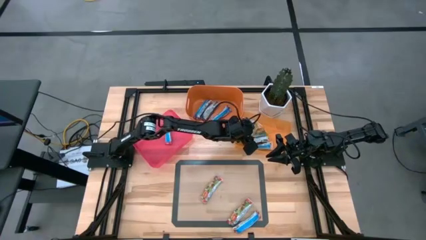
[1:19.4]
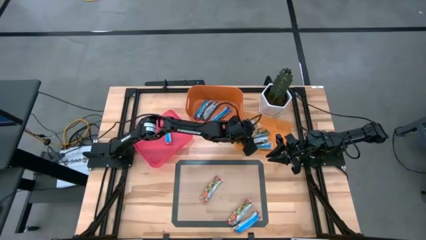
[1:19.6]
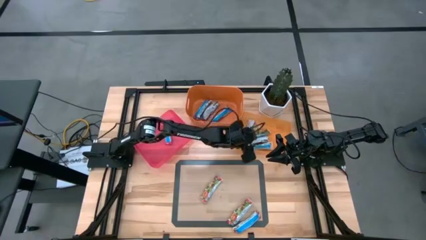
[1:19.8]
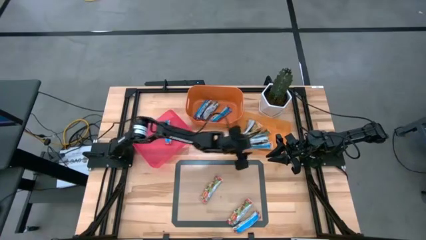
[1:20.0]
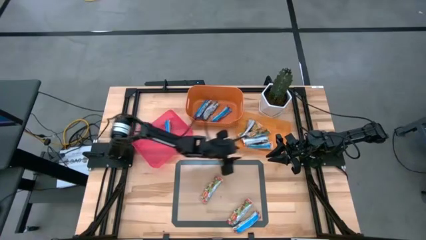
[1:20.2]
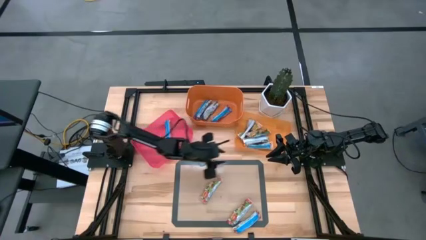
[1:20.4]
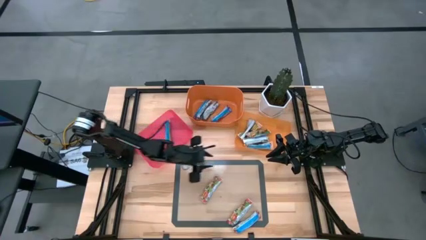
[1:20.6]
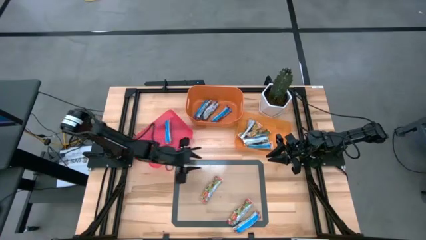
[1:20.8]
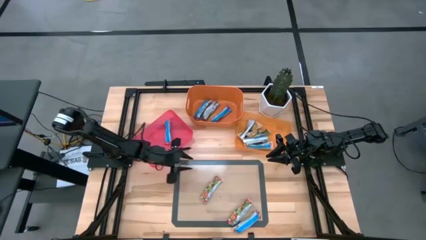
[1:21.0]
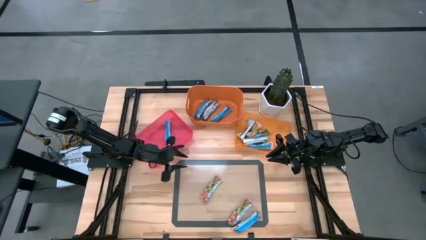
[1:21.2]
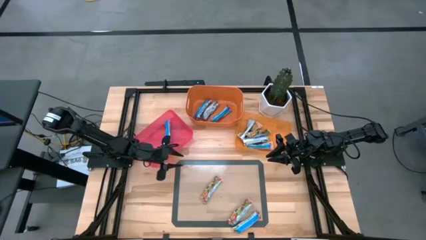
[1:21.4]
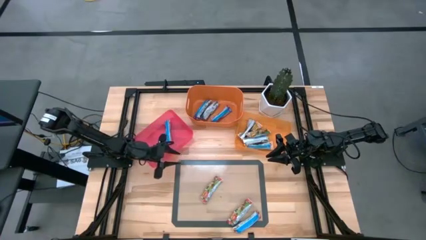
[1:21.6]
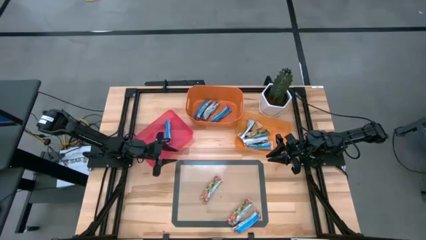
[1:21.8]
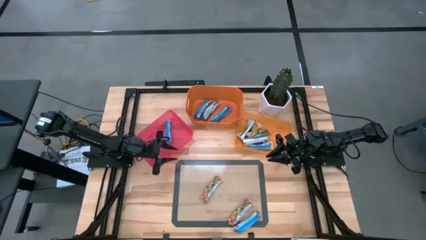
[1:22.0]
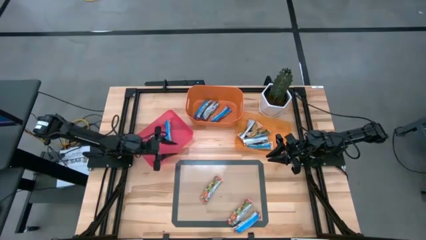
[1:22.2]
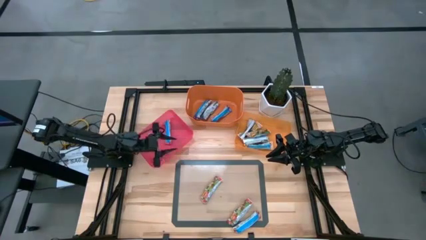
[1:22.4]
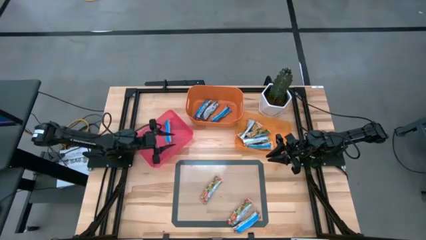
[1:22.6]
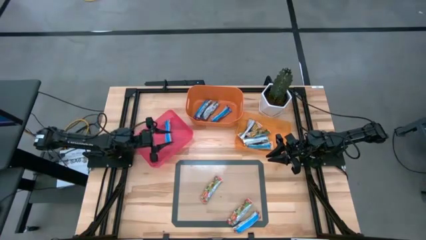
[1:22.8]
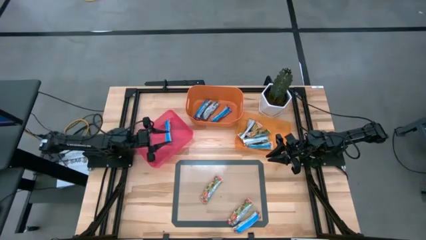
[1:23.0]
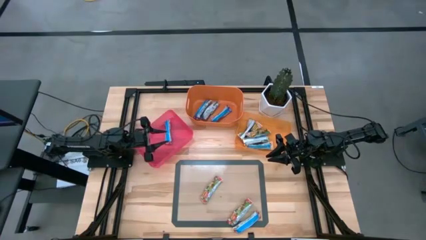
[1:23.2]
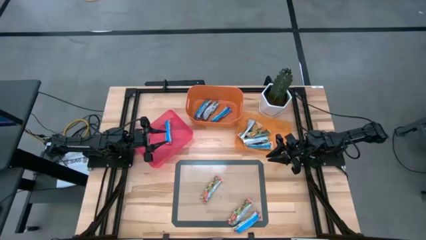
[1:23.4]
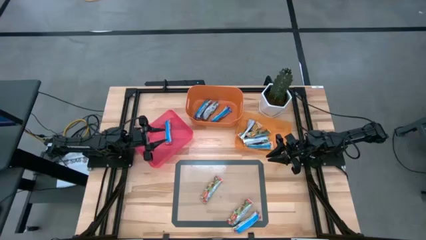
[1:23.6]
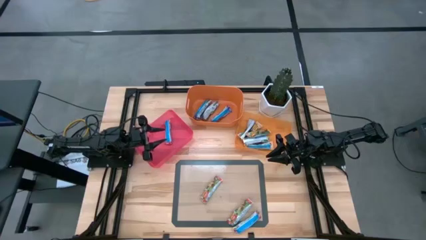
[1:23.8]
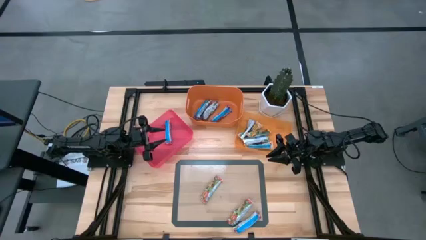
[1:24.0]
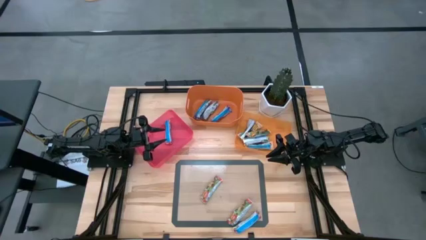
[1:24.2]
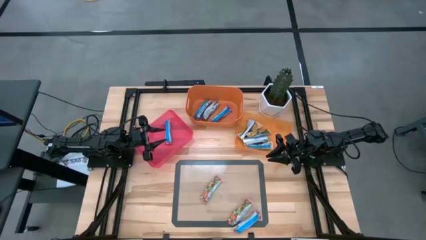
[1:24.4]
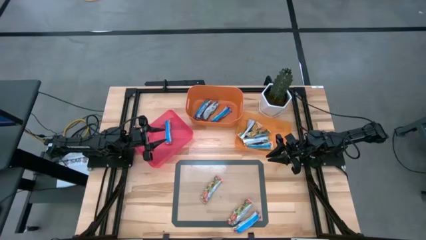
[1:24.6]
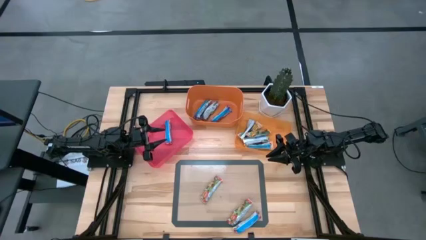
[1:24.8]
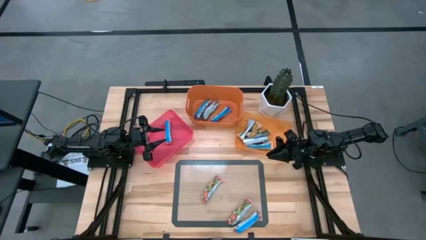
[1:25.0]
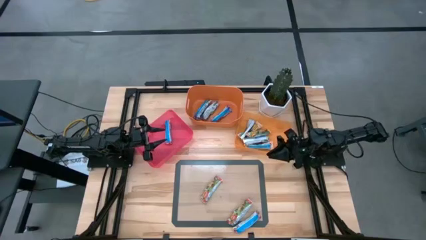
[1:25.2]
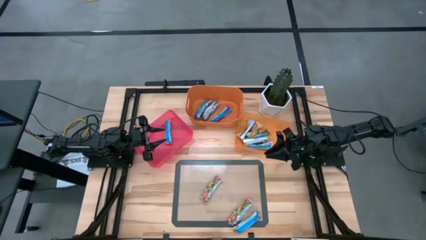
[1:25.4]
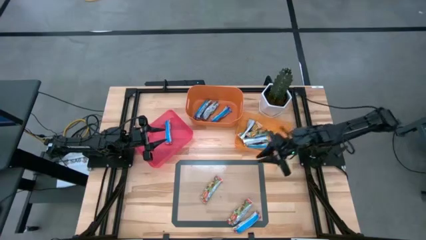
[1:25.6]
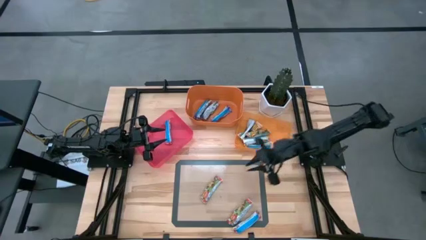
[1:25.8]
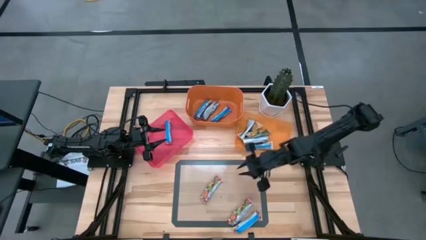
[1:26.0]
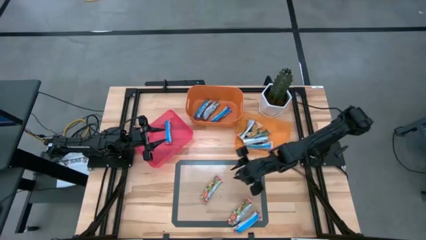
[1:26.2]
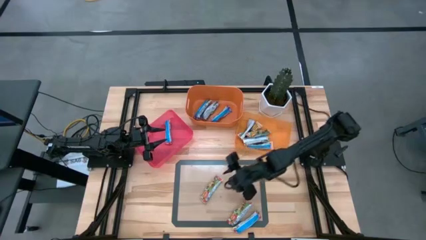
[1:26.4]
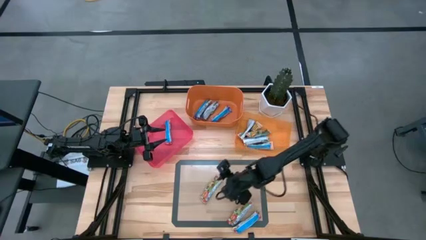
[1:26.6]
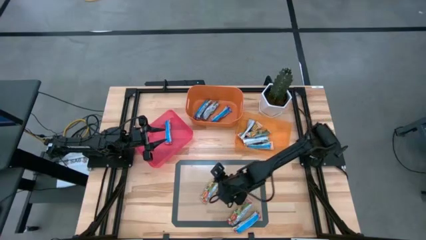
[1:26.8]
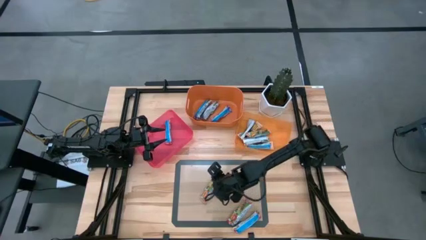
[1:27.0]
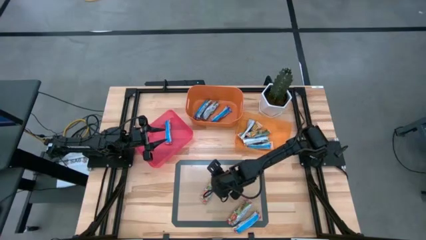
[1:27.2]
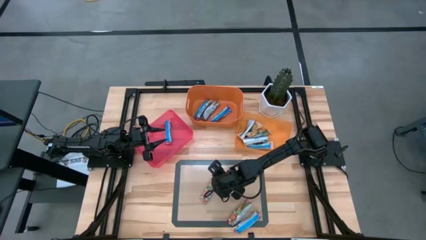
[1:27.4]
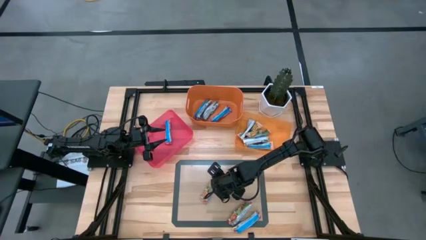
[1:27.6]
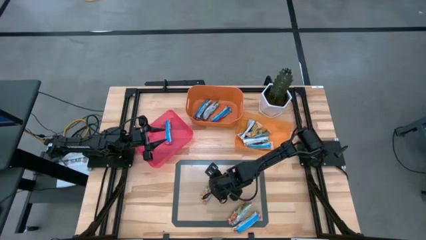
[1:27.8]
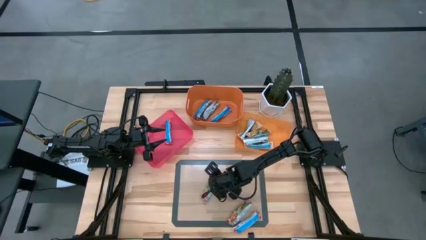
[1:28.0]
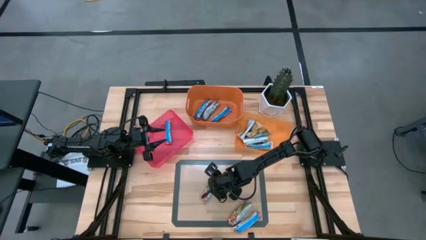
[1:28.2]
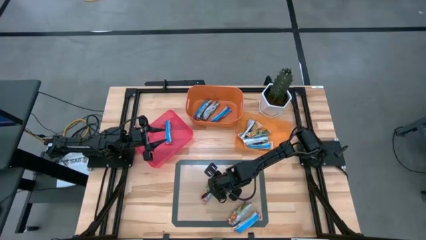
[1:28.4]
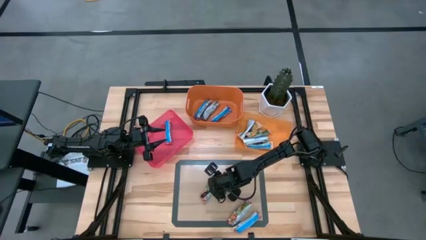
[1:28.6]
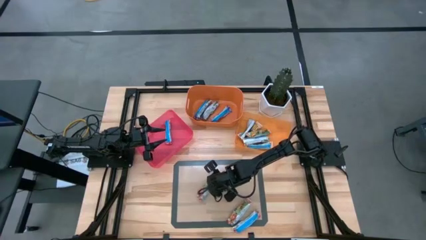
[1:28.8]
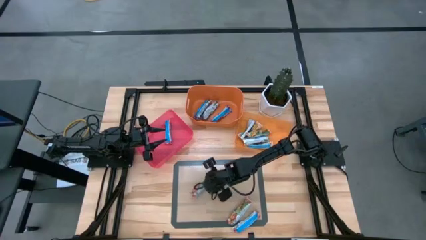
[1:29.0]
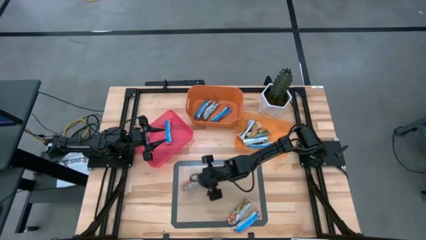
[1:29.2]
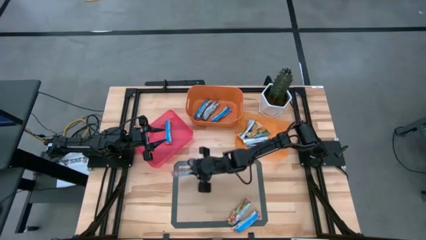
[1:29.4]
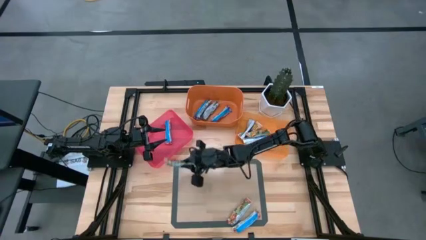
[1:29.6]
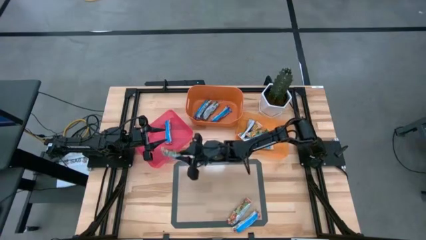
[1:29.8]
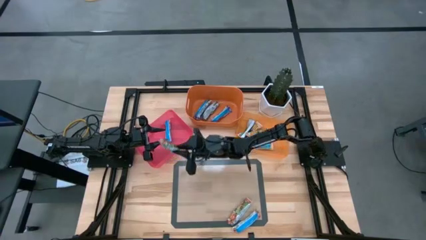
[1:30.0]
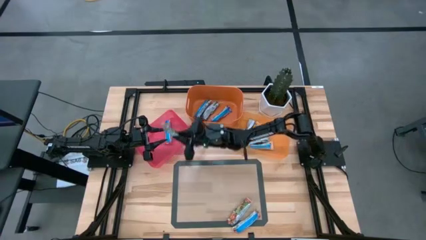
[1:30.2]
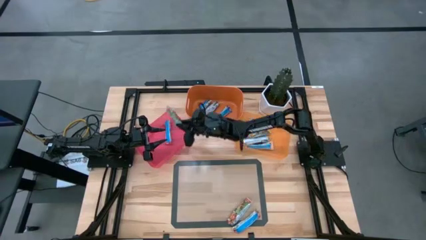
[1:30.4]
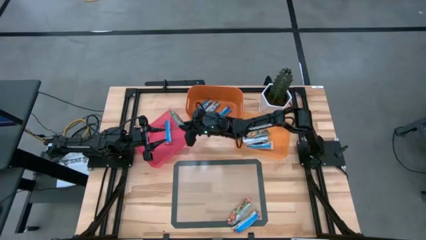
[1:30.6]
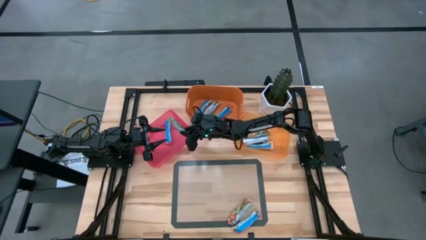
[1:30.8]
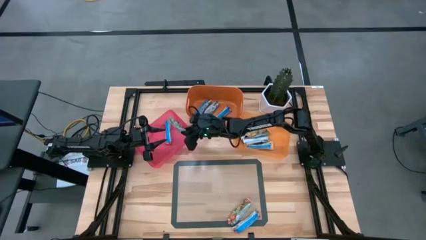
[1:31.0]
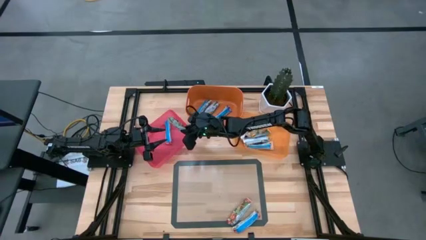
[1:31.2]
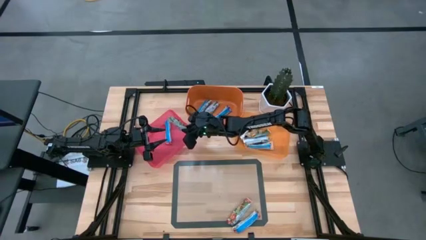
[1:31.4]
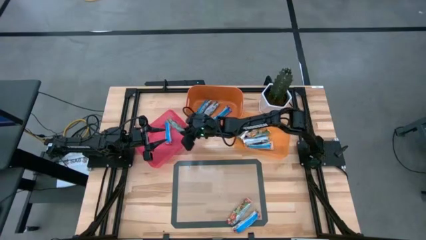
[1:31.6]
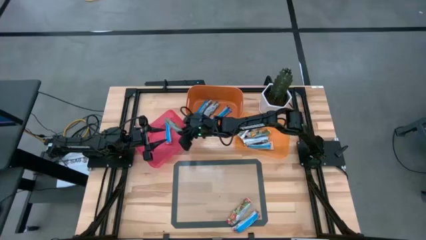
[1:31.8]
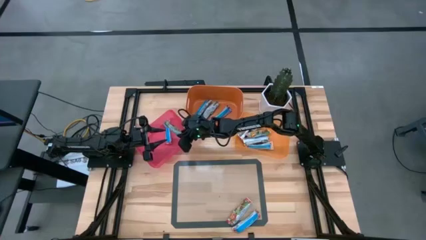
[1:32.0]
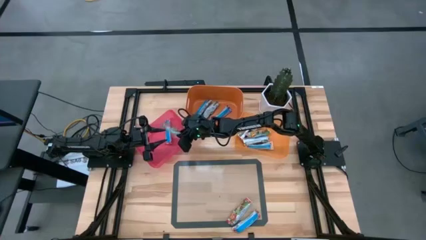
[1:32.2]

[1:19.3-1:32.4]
Task: Pick and place Granola Bars by type
Put the top red granola bar into the red bin

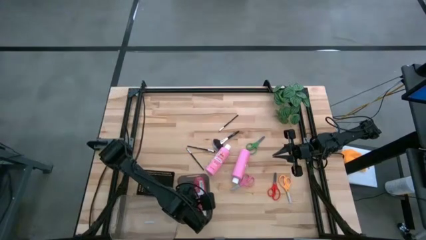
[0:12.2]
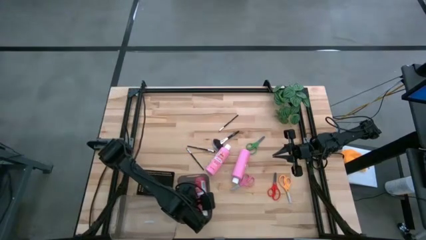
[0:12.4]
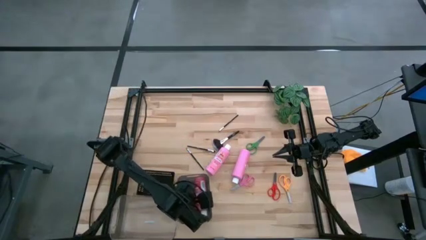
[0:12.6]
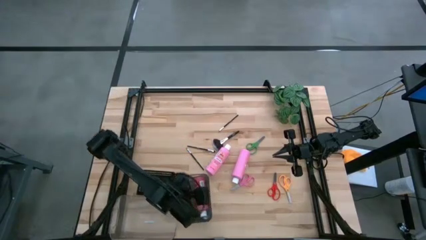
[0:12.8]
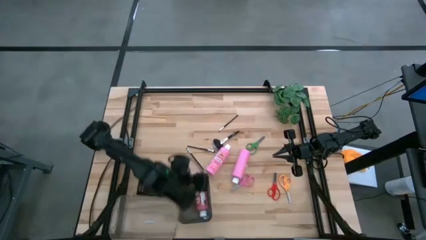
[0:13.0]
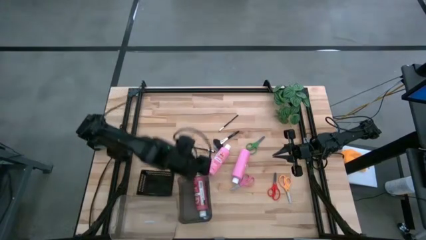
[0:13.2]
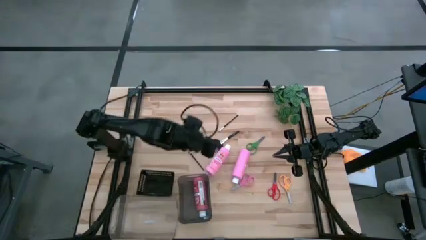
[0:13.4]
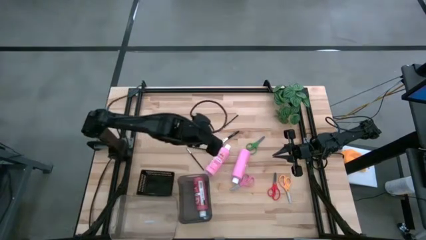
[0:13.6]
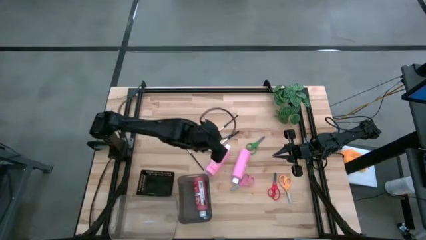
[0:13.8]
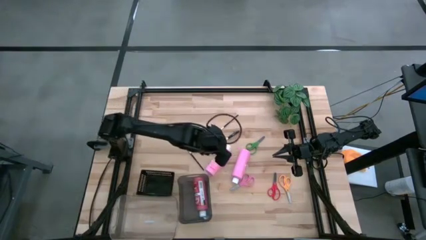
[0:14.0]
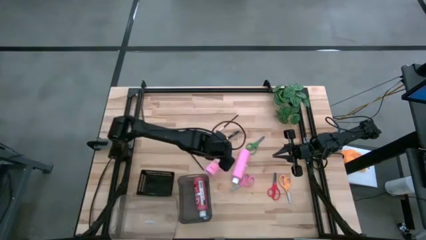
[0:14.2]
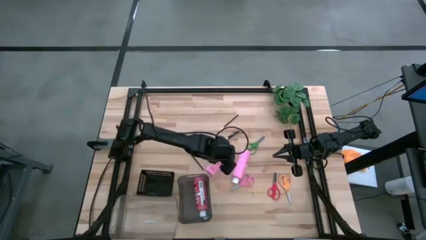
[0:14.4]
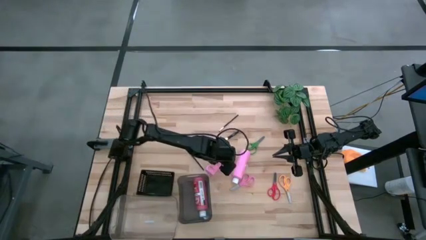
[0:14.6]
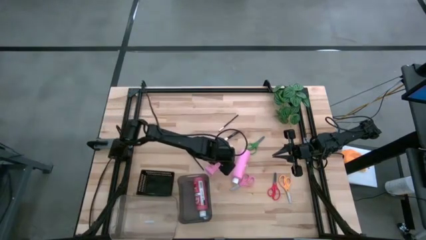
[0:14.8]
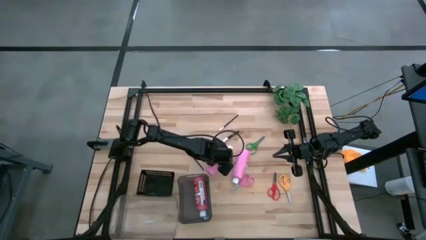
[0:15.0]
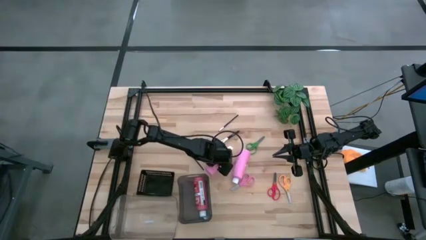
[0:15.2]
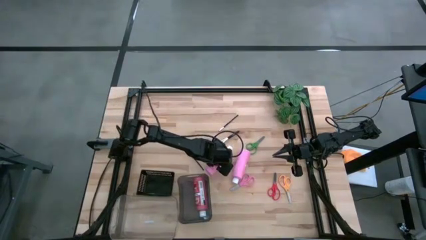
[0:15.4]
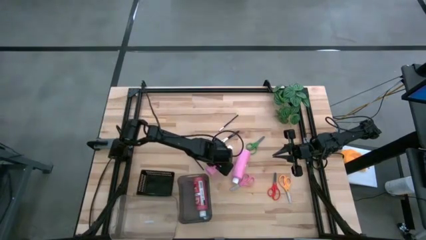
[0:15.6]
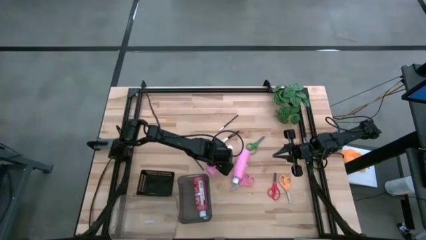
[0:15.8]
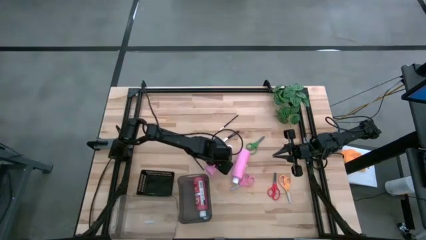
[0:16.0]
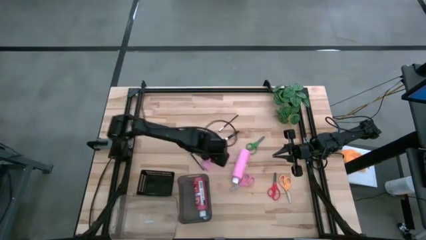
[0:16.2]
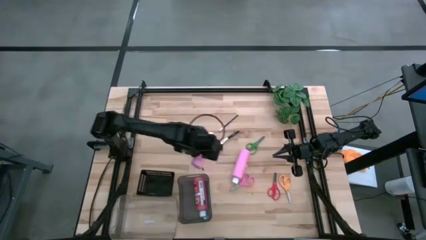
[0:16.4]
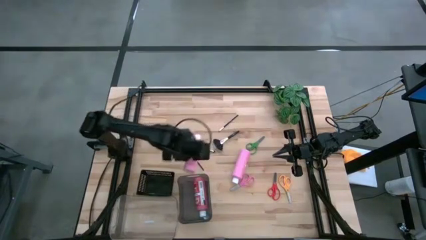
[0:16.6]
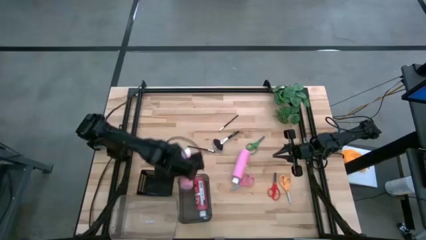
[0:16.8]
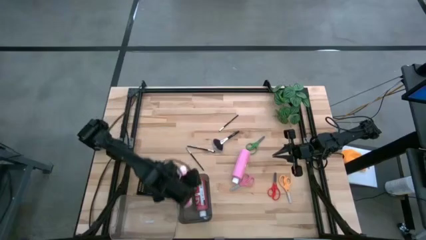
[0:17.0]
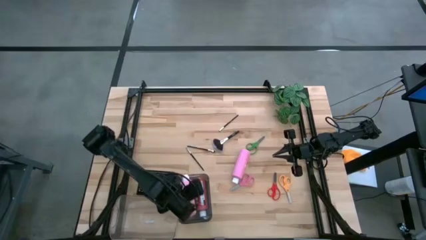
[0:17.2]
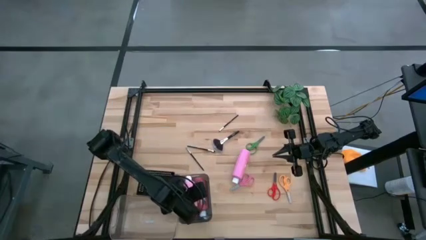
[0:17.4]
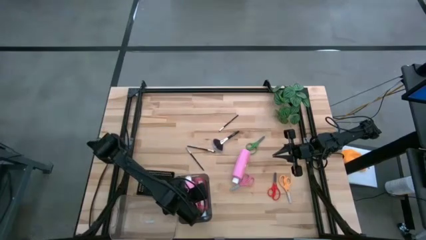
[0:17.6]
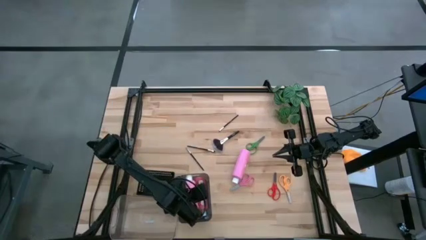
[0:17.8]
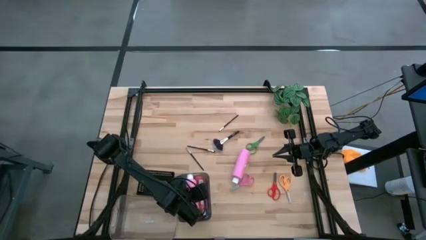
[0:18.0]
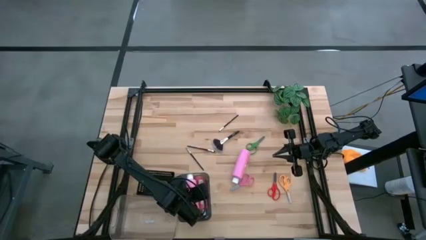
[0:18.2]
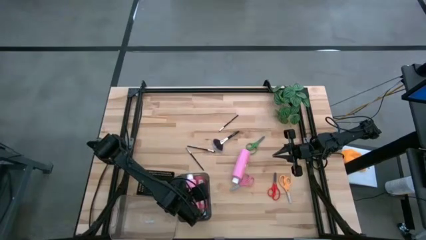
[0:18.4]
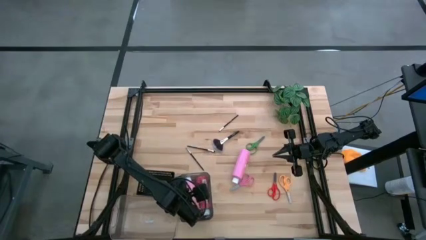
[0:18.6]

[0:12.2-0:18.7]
Task: Pick & Place Paint Supplies
Put the left pink paint bottle into the gray bin
